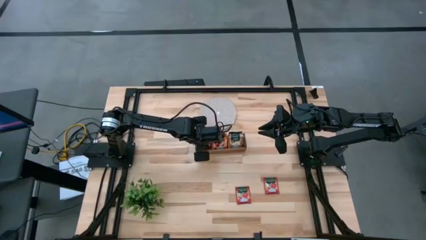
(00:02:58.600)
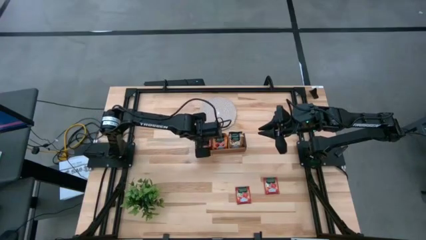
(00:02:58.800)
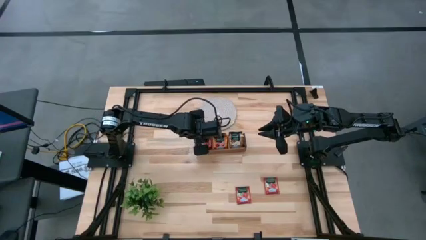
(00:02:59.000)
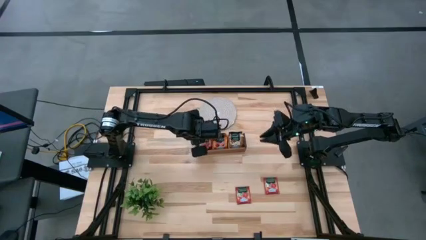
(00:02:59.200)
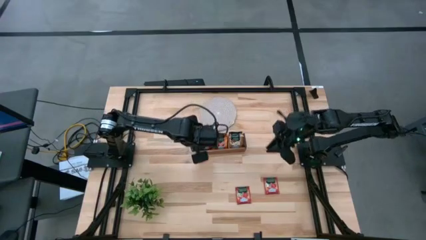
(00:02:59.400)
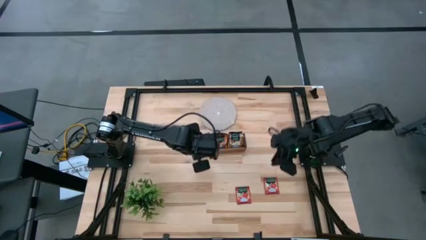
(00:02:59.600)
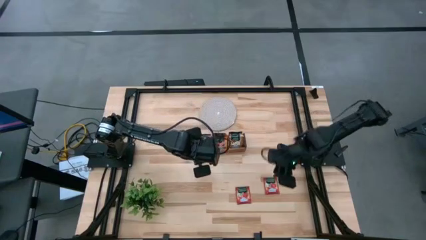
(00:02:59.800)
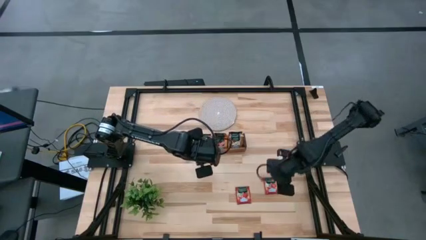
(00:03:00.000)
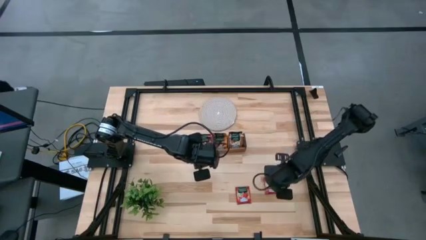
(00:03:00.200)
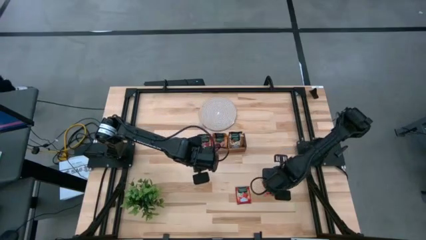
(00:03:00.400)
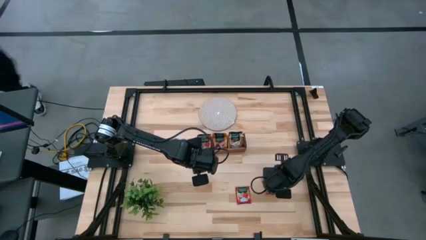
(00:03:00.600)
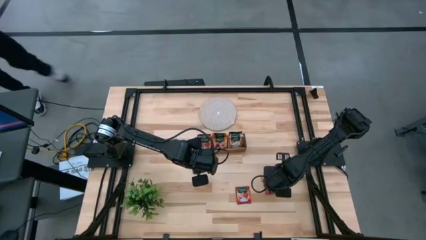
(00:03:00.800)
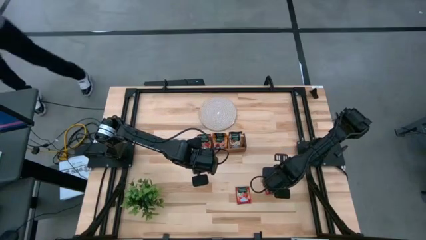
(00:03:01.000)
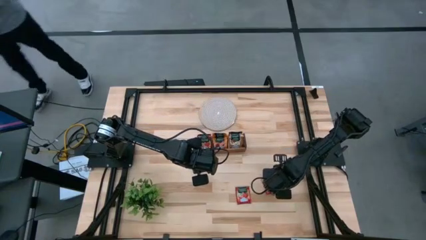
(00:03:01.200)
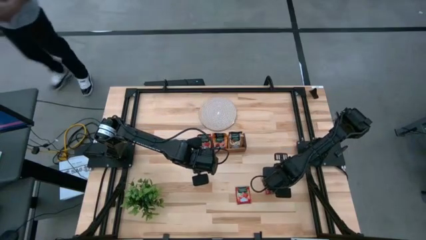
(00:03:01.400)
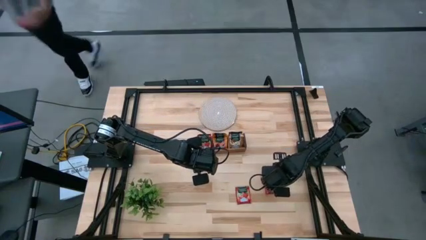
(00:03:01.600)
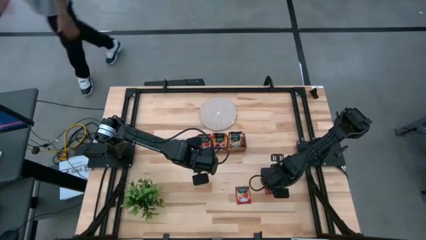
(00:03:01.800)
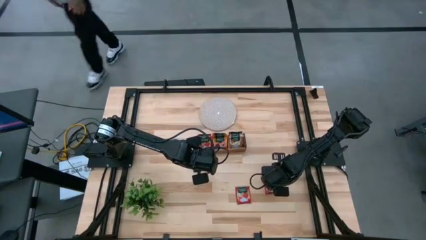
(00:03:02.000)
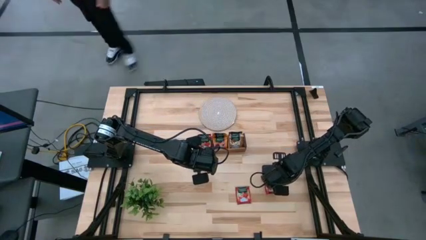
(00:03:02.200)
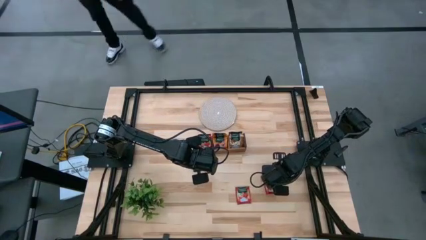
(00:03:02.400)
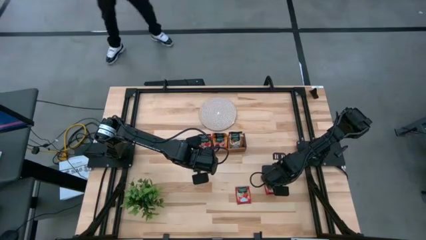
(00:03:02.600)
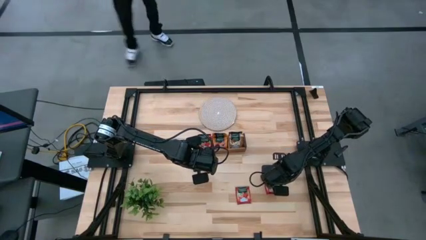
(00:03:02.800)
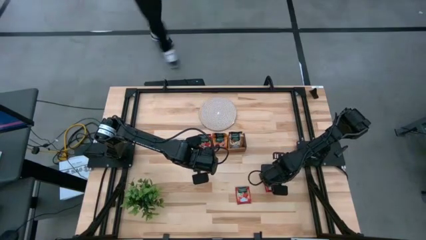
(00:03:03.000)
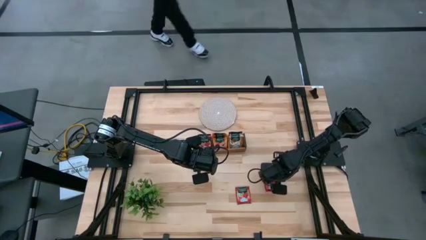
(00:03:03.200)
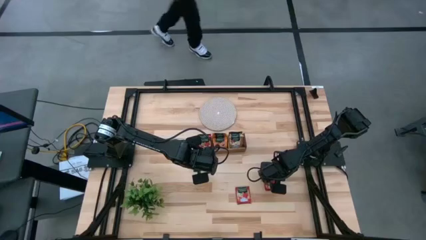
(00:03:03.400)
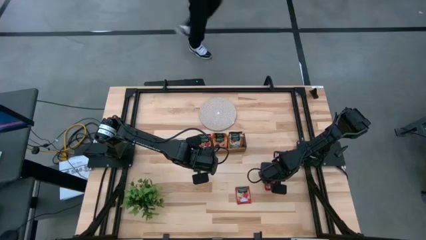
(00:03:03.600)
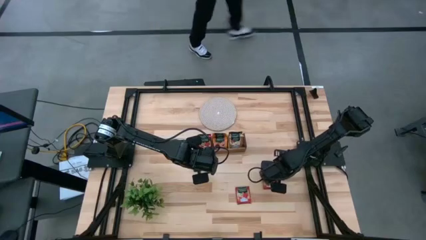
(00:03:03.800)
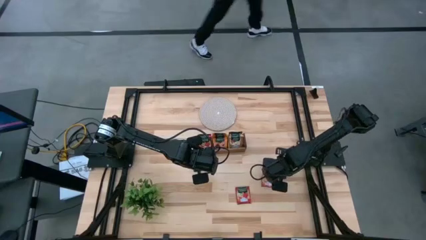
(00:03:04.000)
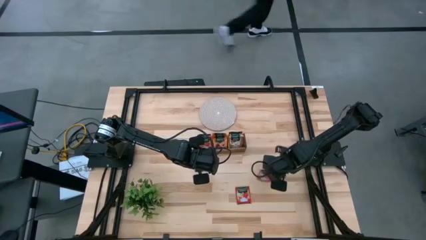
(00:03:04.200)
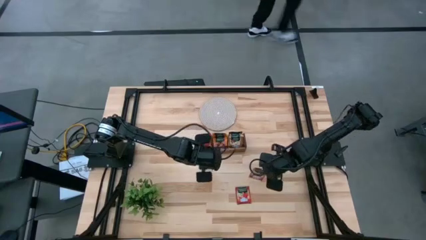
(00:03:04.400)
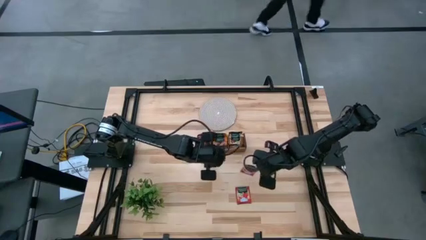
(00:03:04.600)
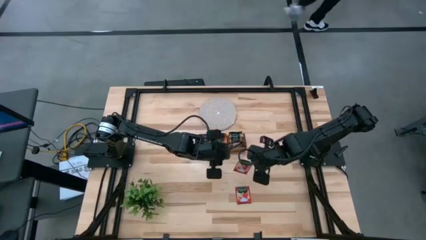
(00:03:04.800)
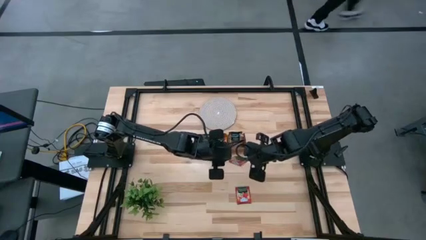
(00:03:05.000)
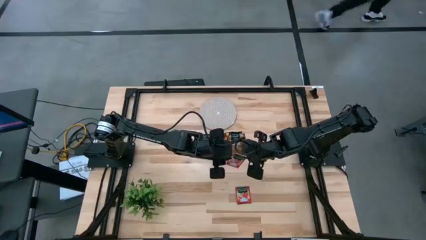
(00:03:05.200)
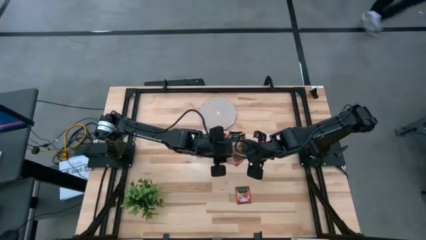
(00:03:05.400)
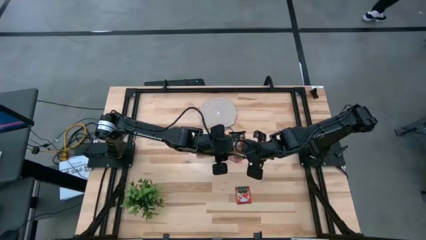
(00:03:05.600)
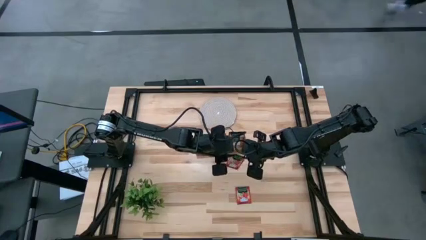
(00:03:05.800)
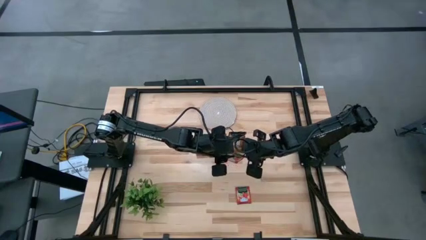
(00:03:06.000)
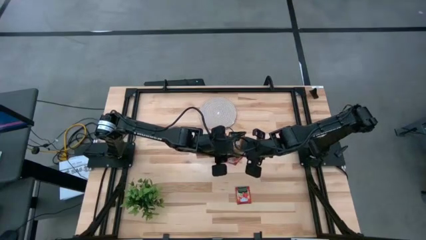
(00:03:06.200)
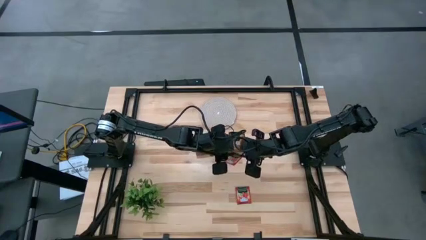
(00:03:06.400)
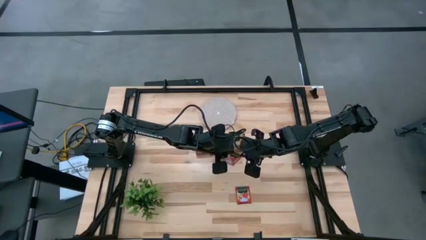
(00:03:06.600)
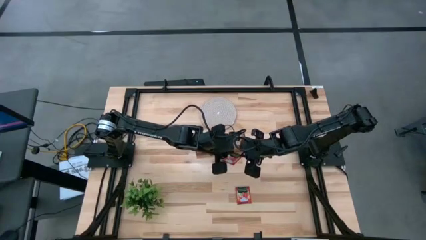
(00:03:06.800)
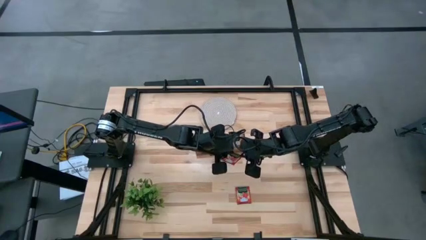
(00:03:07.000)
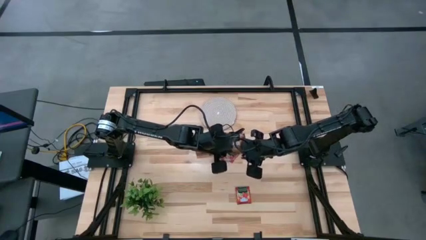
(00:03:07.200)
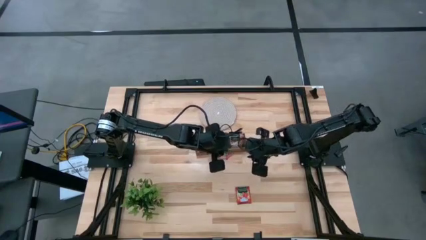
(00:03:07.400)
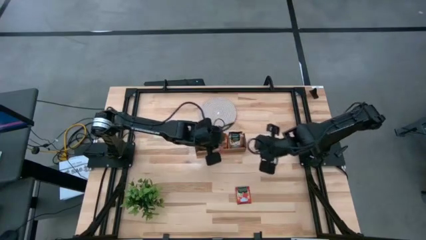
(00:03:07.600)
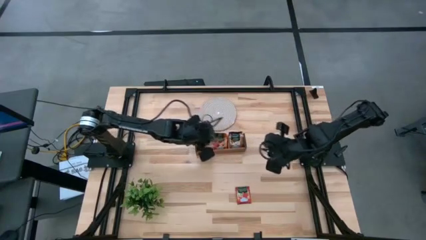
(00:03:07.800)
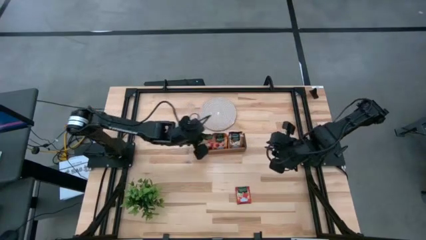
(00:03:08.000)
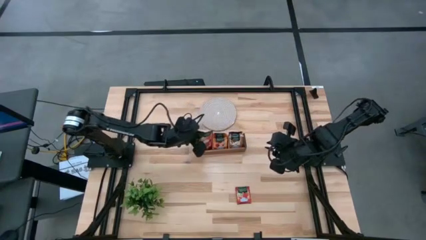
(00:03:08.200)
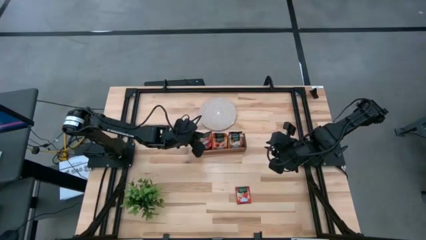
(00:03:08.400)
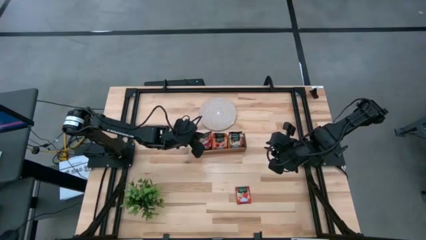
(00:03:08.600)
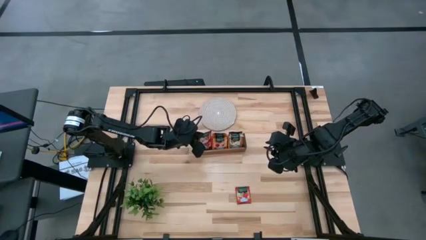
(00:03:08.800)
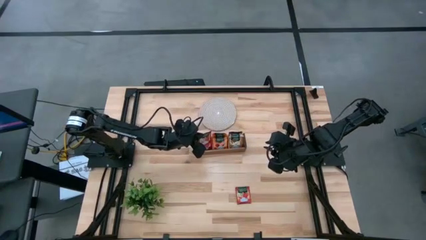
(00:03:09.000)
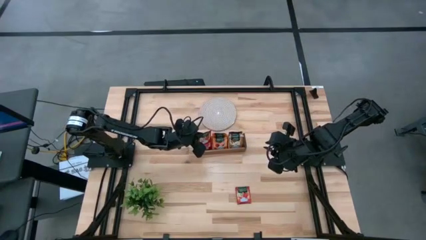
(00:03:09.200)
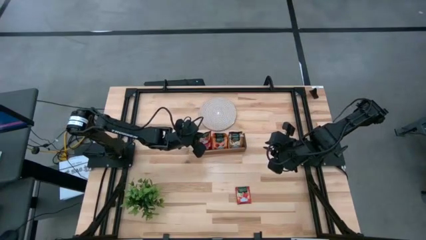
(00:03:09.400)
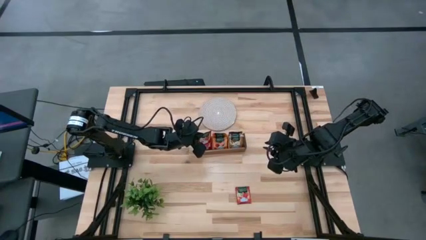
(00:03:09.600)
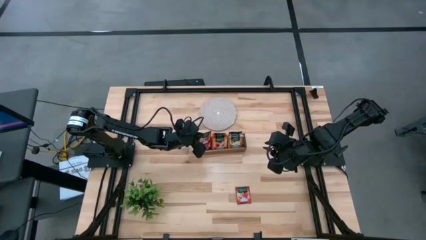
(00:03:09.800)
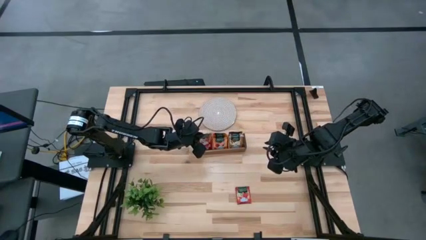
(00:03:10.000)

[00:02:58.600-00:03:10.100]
Task: Pick & Place Tea
Put the red tea bag into the left section of the wooden organizer
